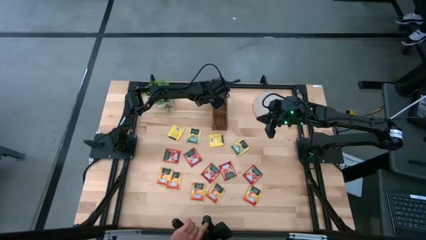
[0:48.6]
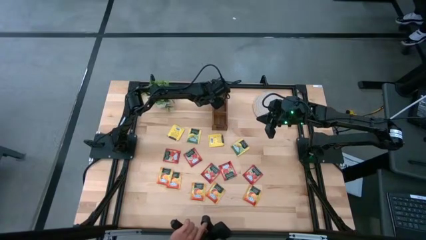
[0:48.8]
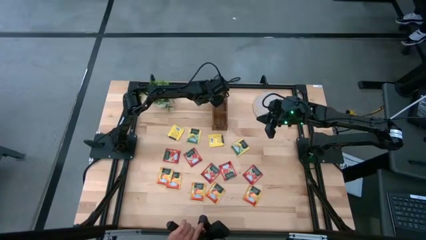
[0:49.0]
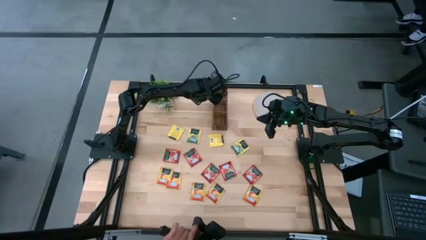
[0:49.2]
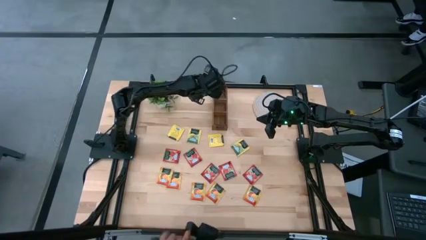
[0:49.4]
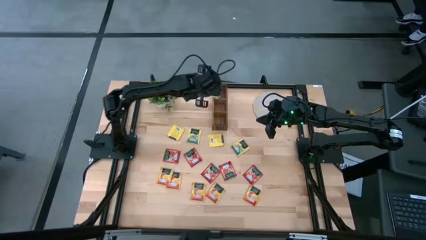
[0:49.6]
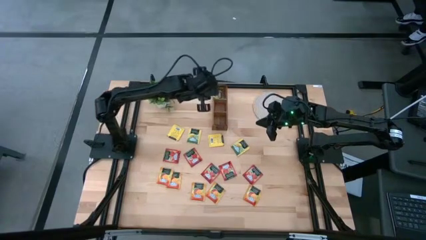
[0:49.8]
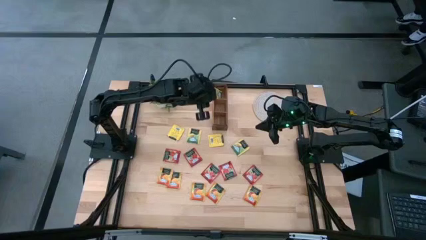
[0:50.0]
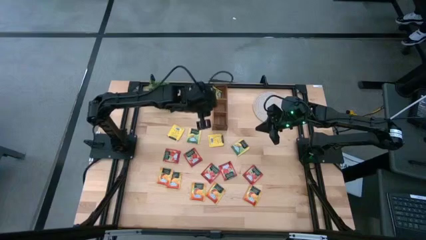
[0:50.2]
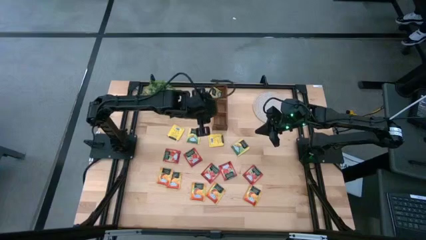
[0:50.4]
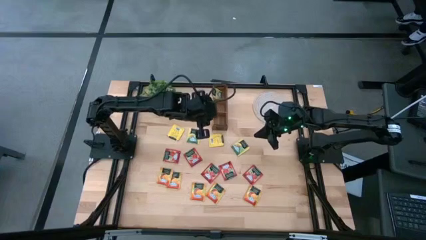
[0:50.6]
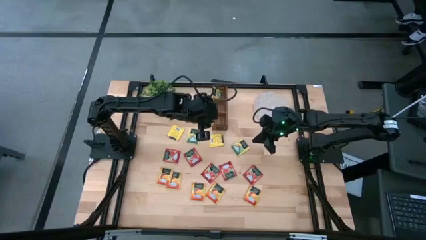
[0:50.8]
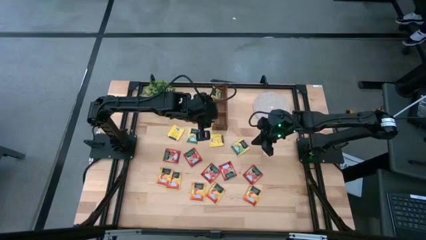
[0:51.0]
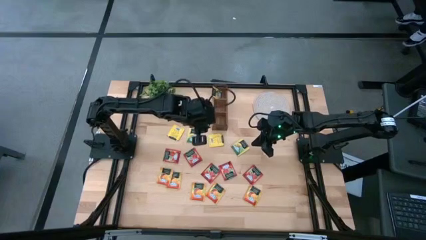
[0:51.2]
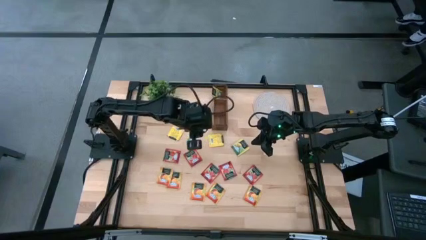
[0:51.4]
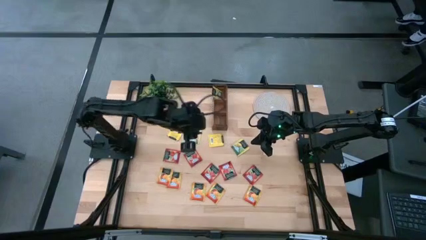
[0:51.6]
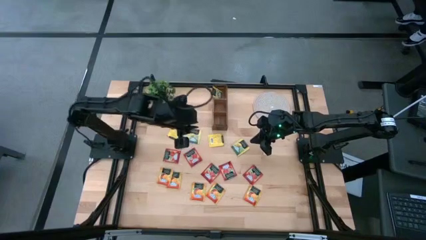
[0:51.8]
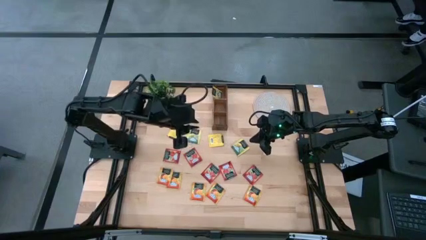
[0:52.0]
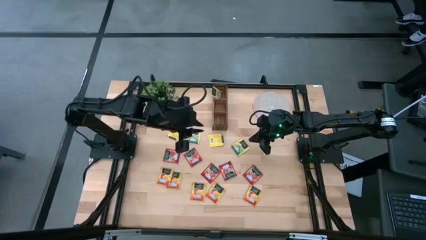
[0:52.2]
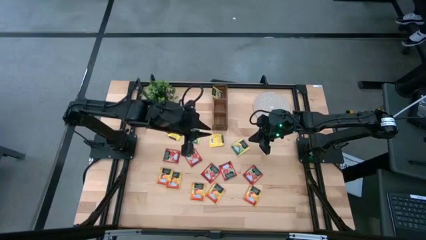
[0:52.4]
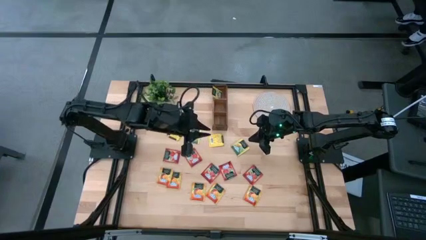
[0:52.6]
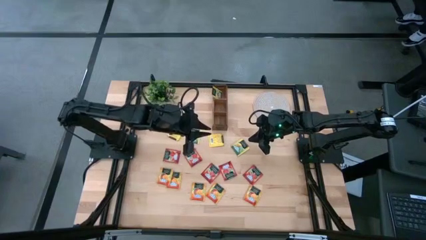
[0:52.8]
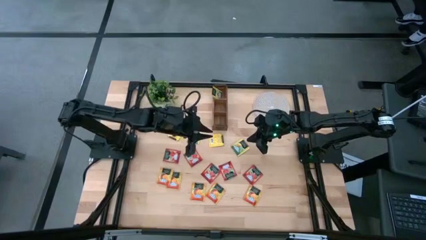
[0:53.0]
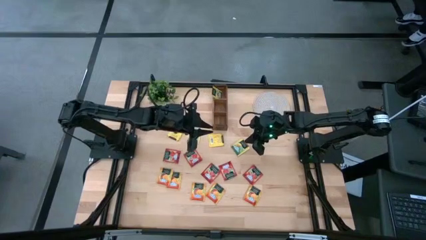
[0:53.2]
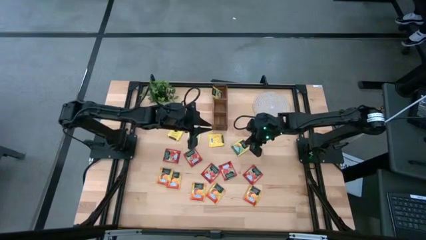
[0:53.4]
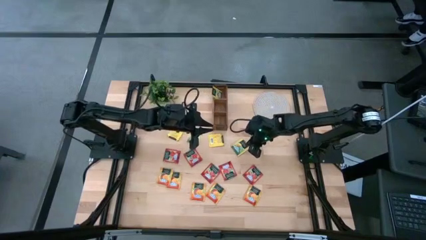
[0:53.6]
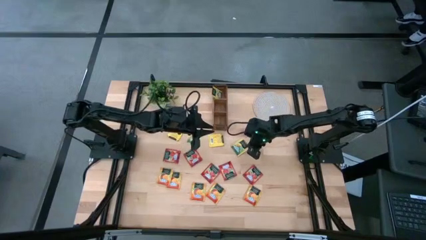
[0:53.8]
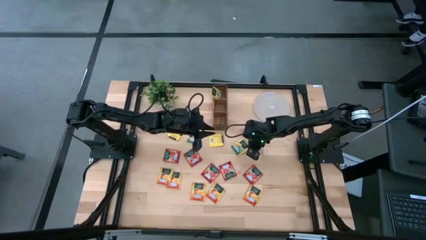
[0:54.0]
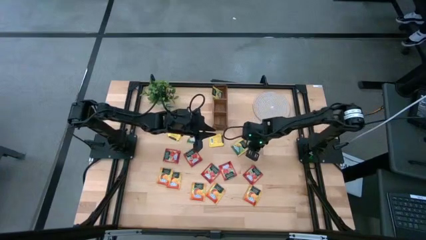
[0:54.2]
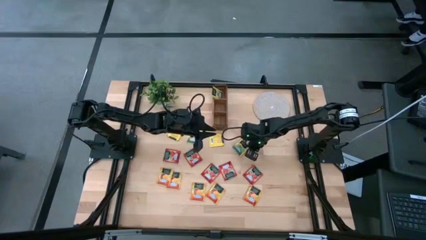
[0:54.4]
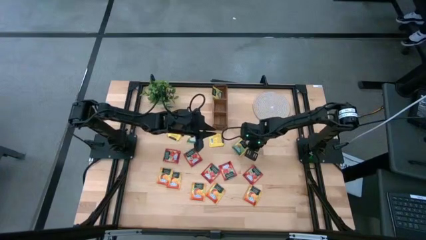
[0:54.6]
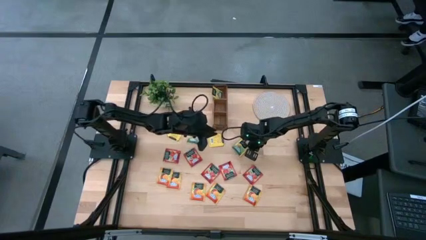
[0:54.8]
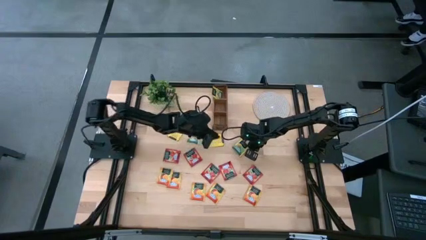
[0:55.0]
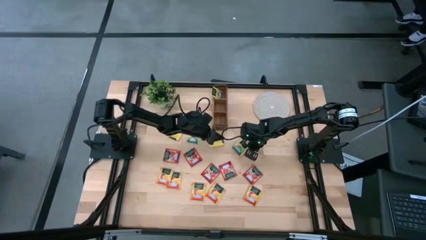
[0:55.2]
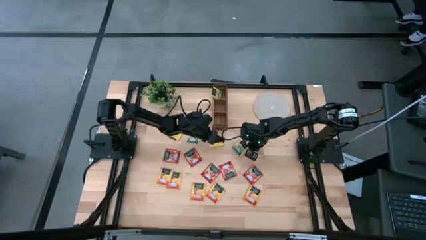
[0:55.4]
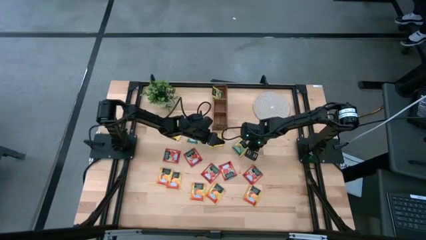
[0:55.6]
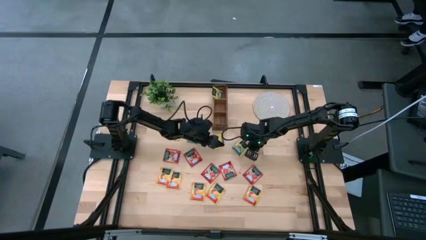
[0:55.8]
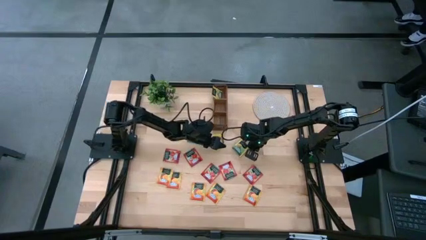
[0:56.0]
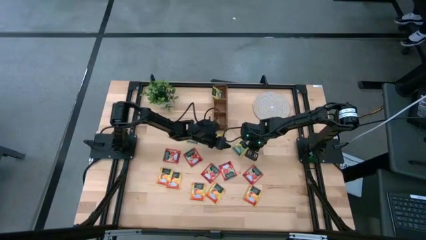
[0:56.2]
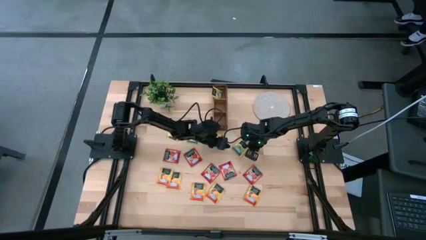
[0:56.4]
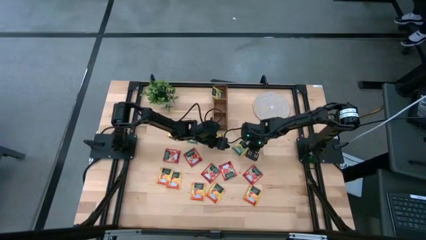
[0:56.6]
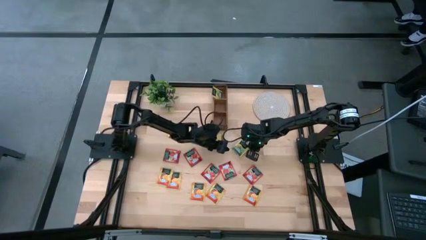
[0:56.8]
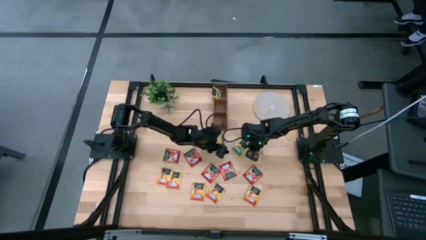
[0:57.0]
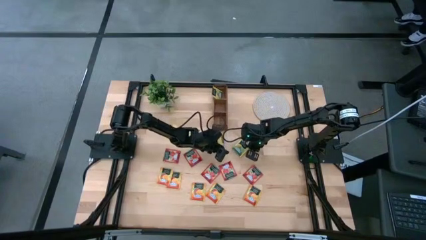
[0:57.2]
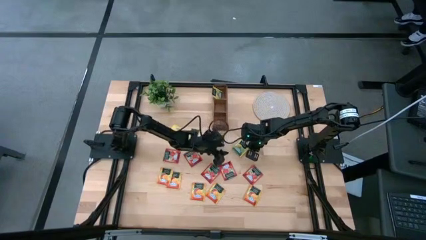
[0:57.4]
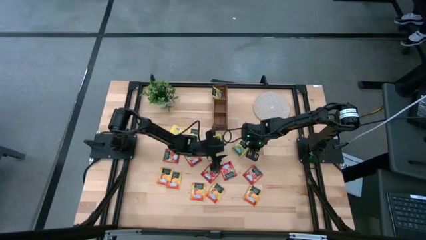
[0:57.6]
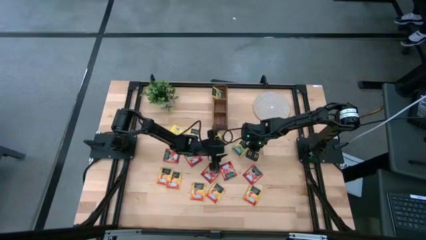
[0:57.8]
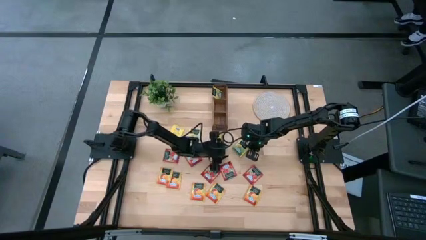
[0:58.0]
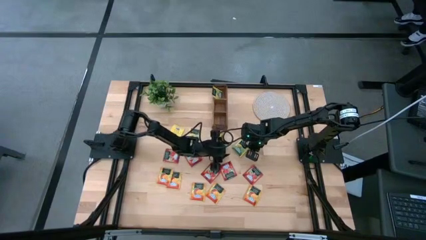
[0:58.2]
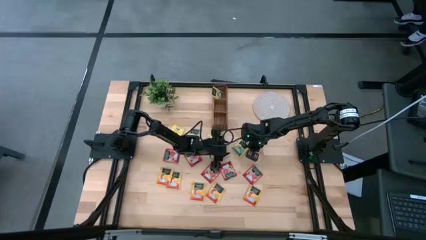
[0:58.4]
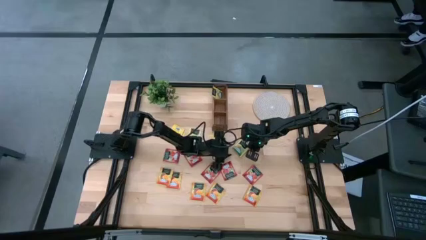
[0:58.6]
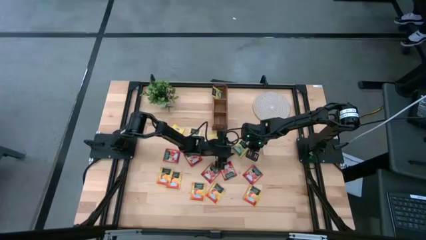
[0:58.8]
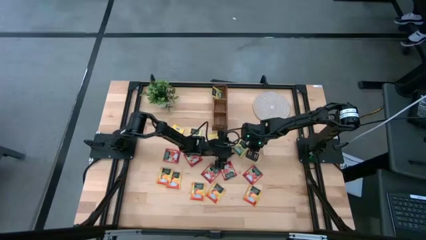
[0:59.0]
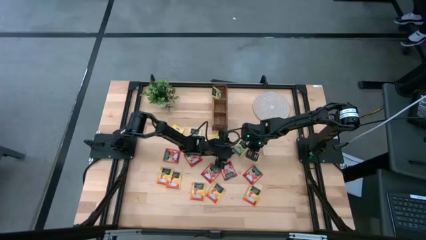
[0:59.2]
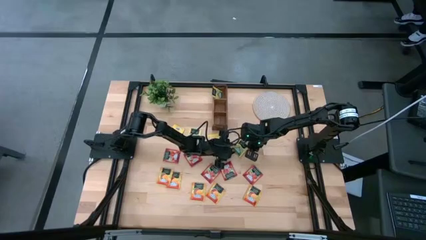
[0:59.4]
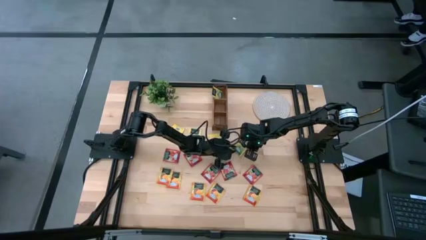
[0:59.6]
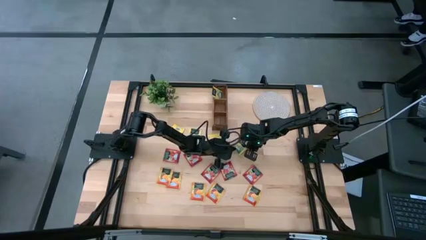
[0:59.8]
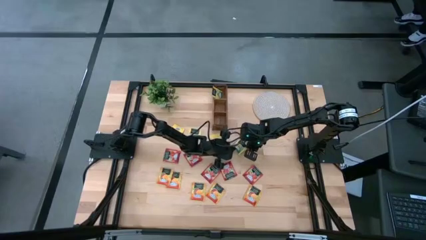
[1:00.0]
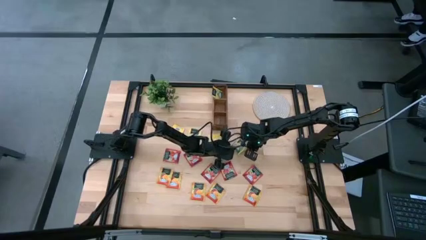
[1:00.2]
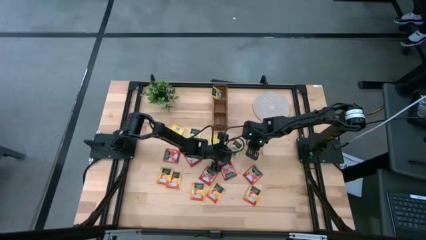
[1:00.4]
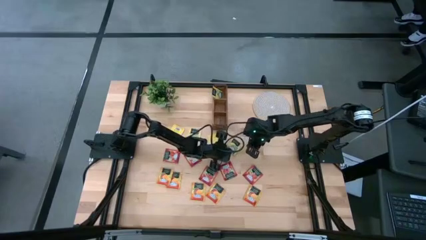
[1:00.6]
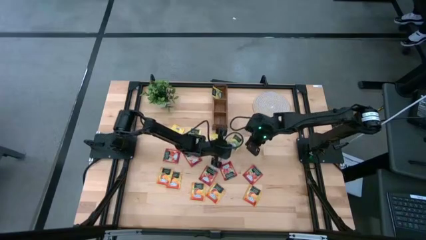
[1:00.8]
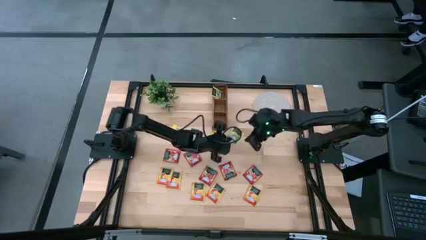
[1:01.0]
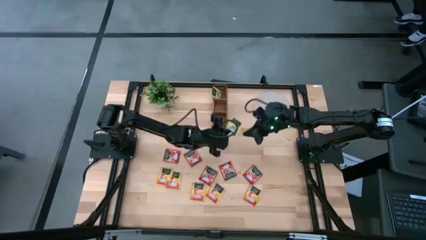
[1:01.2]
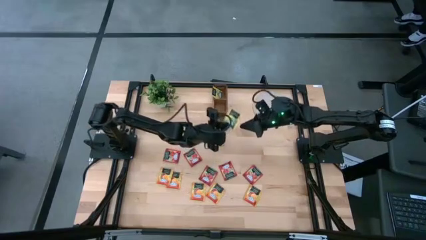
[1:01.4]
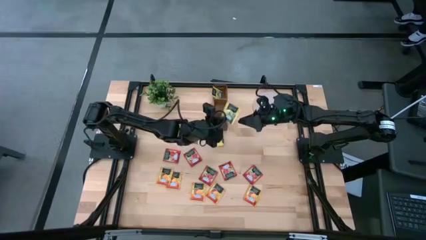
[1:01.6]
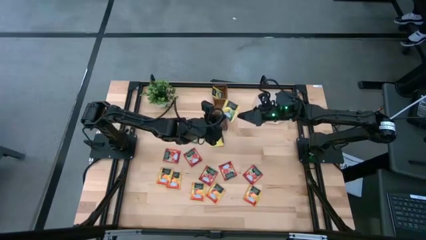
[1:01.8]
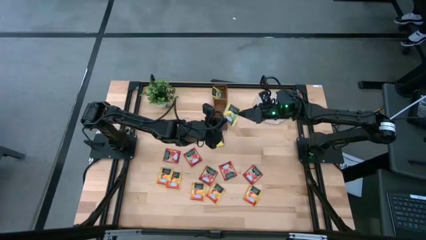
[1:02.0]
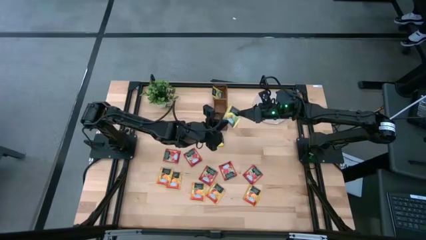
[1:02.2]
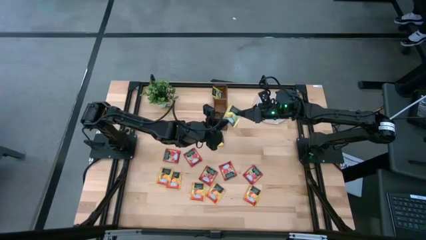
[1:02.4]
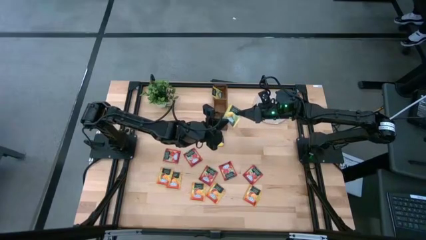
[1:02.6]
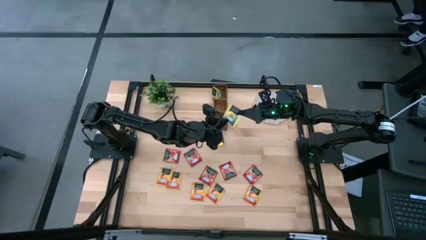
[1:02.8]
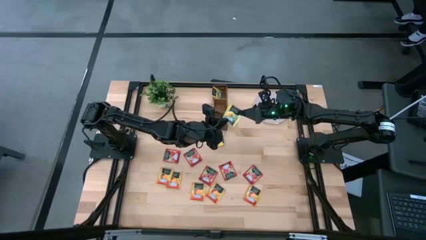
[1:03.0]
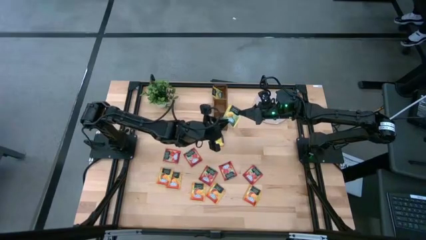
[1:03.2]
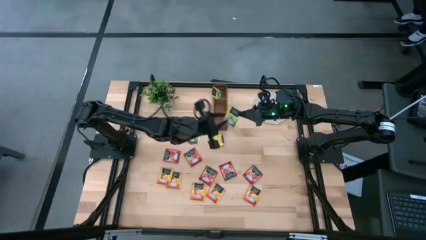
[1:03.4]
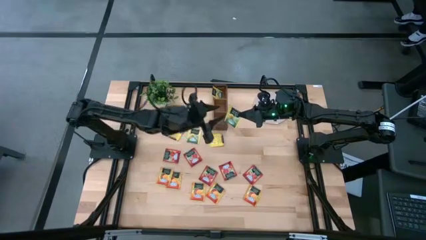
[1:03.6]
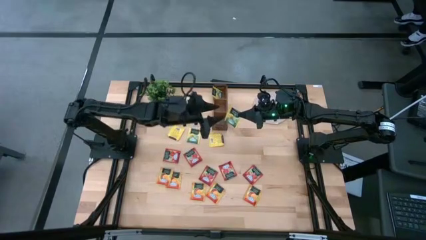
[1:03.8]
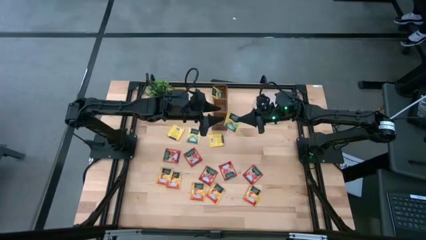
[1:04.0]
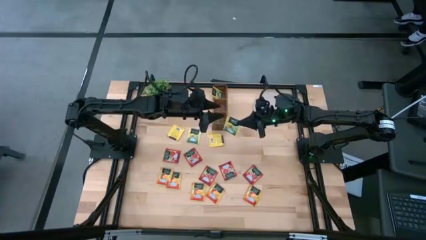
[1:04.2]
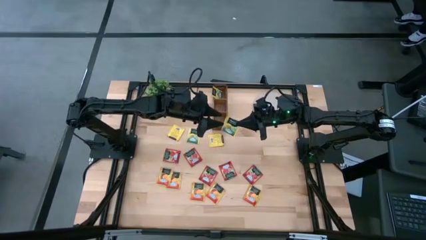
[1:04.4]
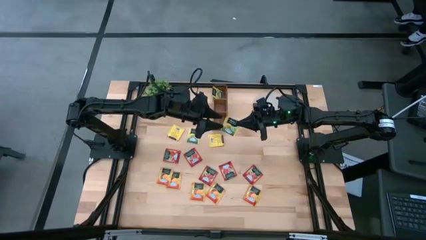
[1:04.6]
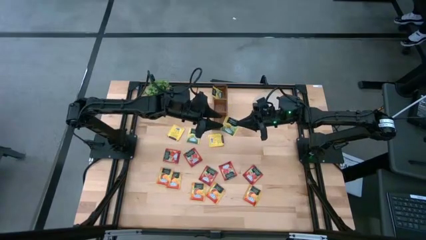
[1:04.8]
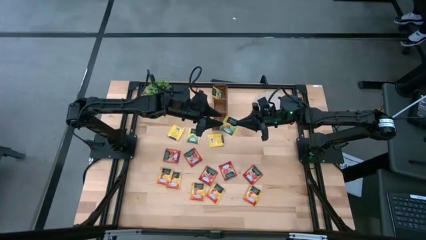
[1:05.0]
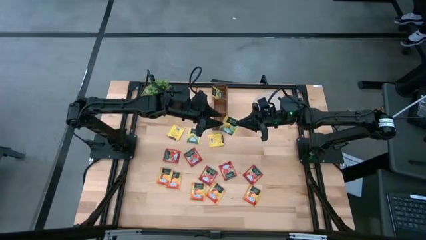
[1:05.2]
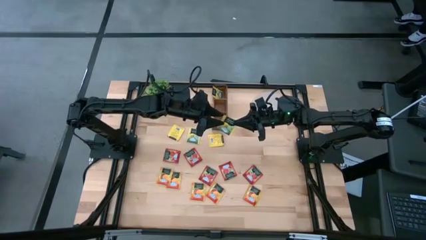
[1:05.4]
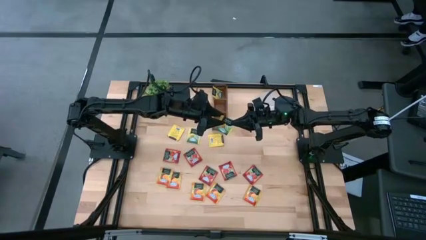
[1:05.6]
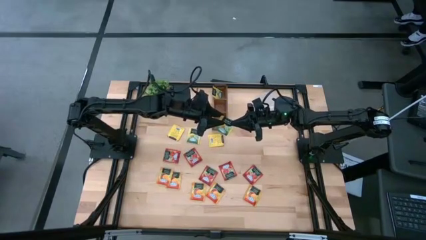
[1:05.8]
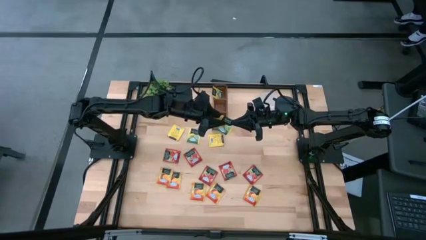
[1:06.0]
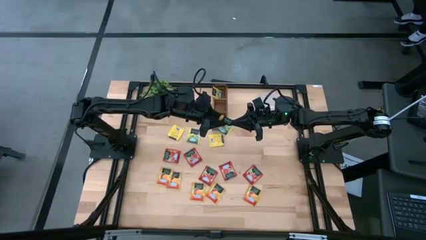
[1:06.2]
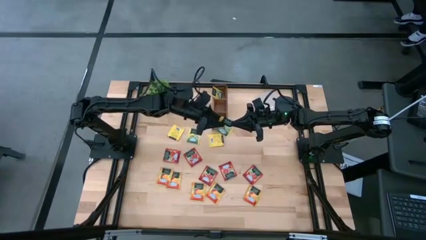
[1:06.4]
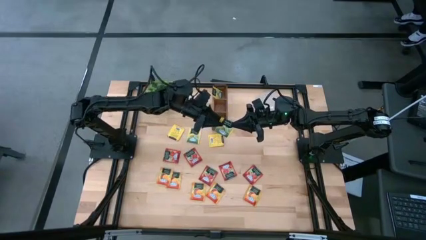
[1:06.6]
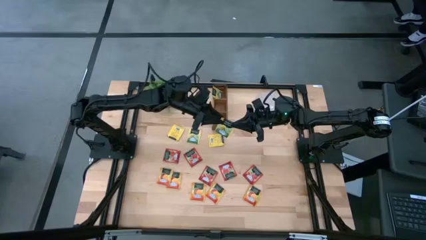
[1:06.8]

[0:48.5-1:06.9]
Task: Pick & Place Tea
Put the yellow tea bag into the left section of the wooden organizer
